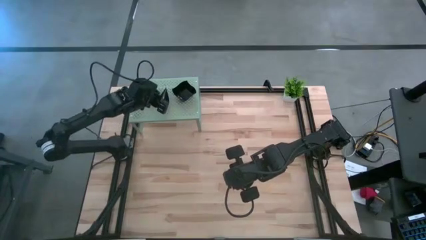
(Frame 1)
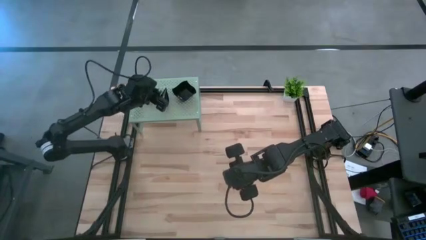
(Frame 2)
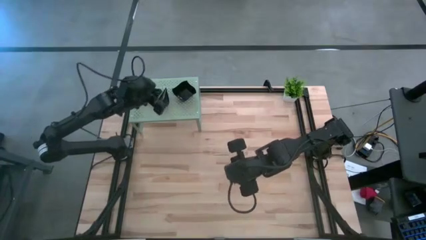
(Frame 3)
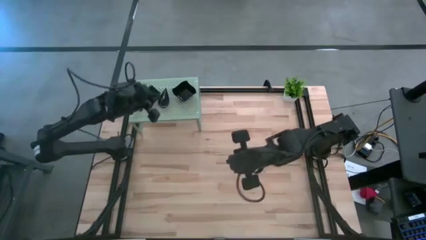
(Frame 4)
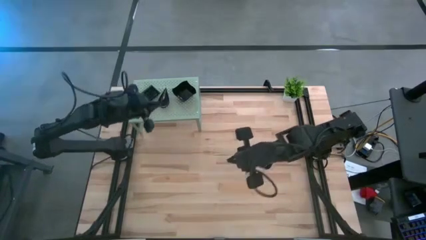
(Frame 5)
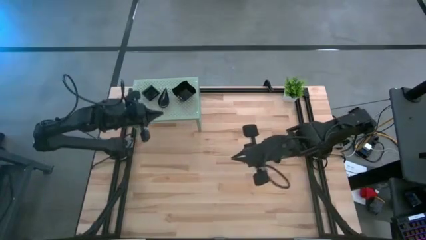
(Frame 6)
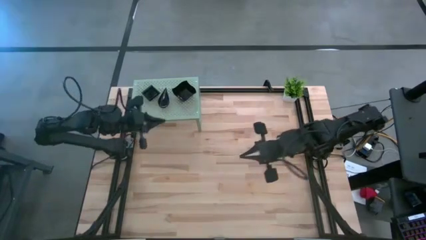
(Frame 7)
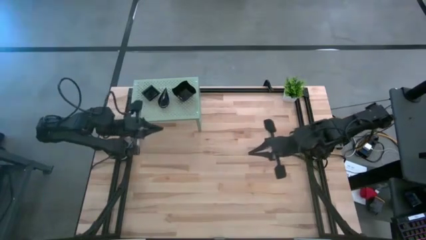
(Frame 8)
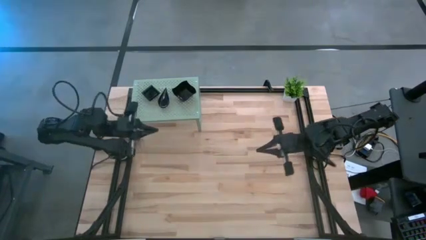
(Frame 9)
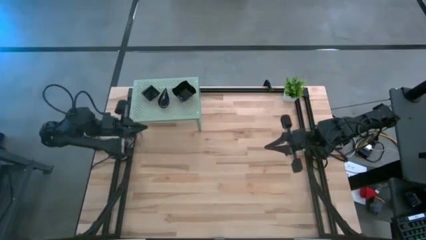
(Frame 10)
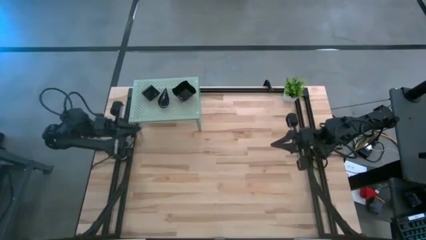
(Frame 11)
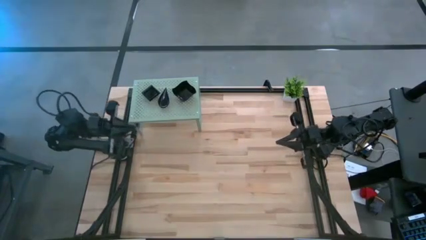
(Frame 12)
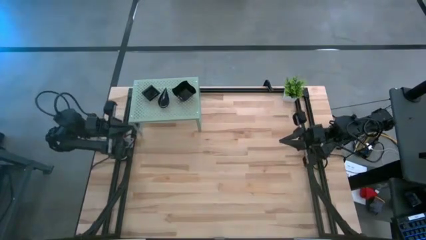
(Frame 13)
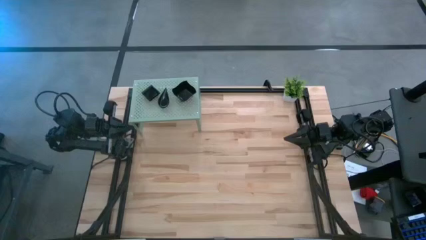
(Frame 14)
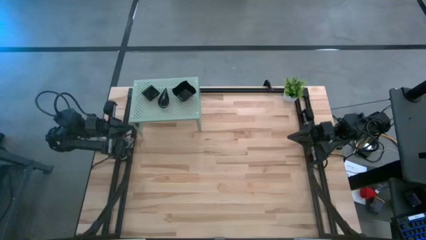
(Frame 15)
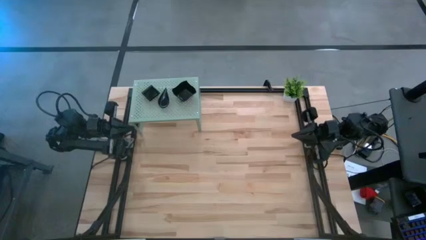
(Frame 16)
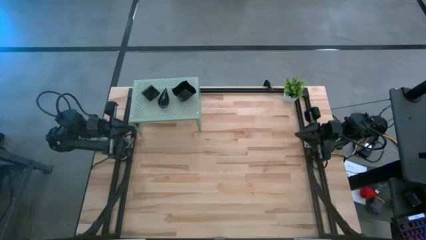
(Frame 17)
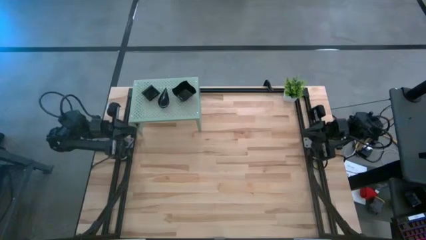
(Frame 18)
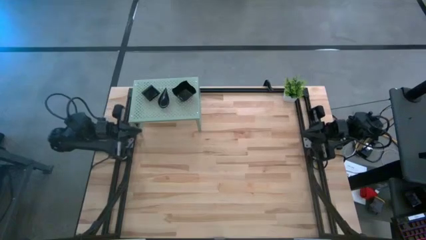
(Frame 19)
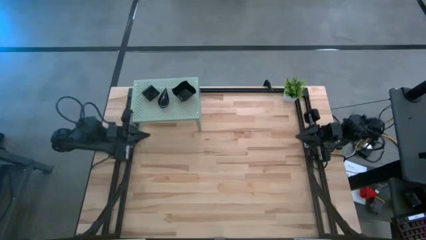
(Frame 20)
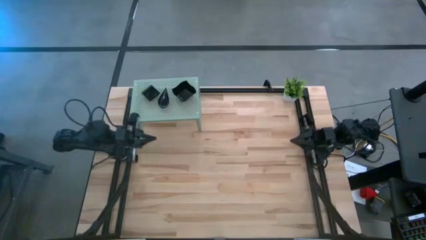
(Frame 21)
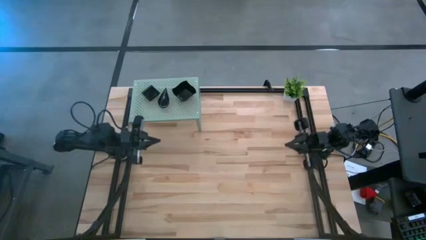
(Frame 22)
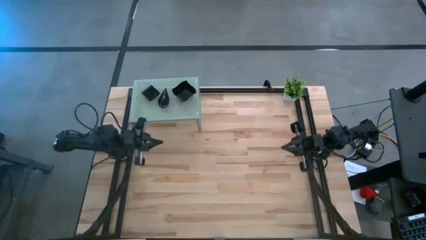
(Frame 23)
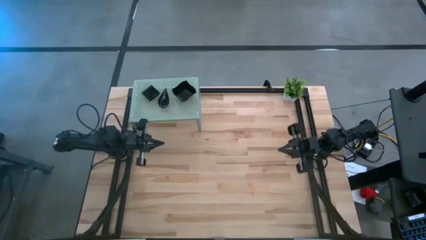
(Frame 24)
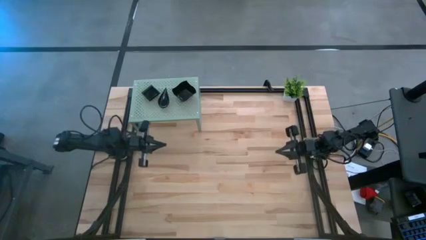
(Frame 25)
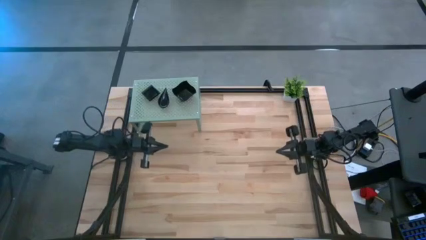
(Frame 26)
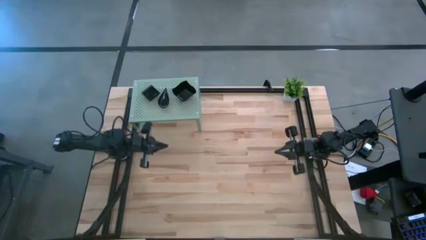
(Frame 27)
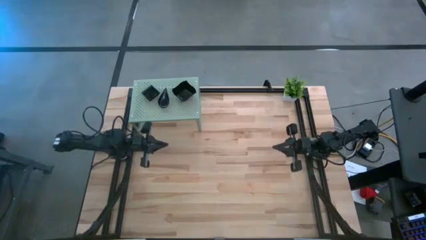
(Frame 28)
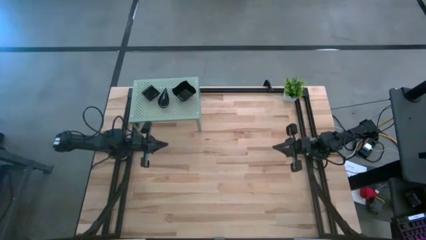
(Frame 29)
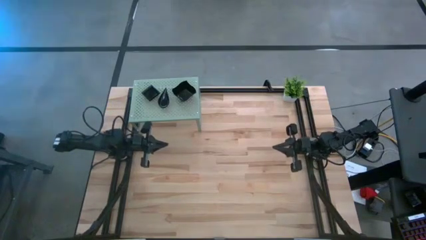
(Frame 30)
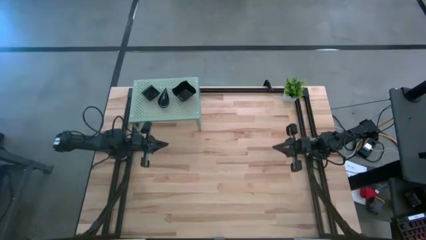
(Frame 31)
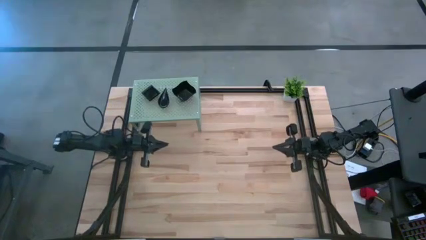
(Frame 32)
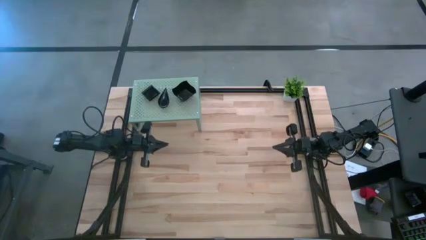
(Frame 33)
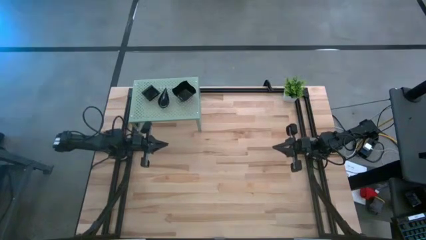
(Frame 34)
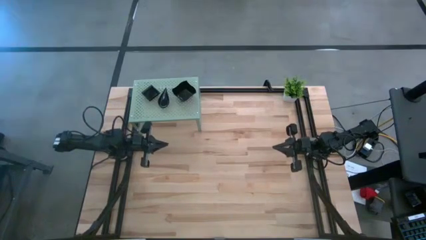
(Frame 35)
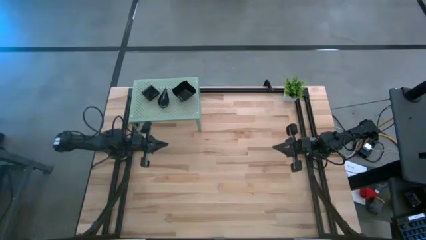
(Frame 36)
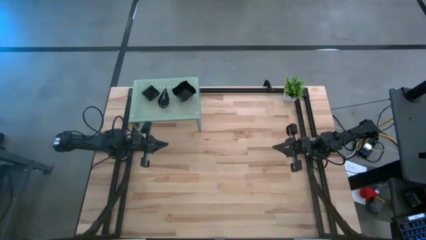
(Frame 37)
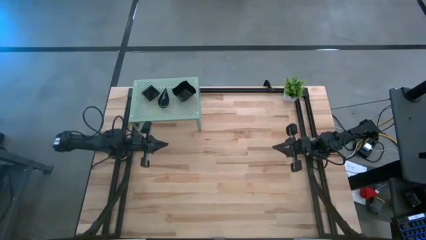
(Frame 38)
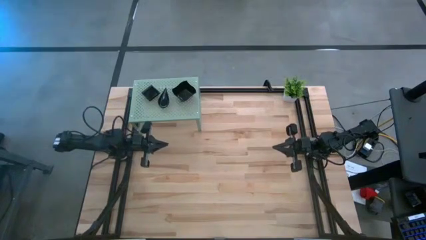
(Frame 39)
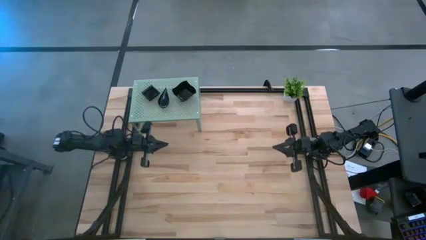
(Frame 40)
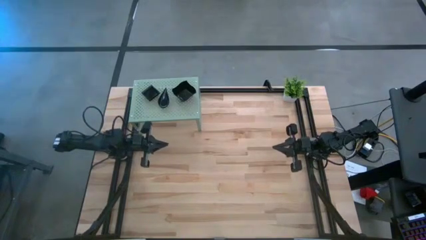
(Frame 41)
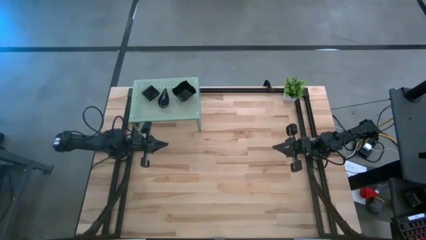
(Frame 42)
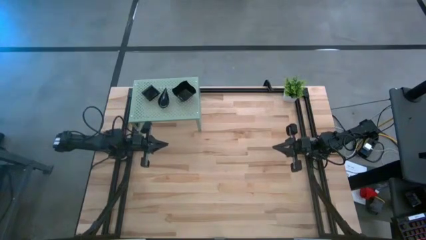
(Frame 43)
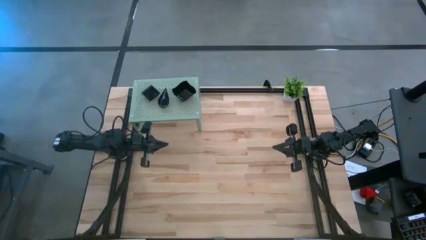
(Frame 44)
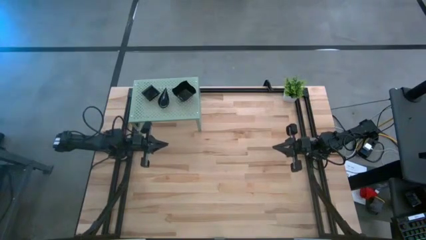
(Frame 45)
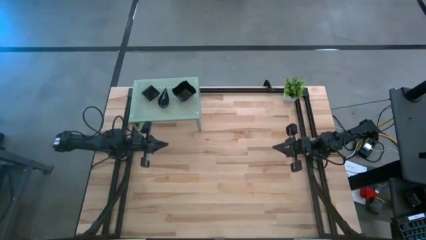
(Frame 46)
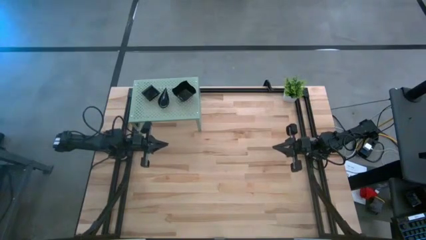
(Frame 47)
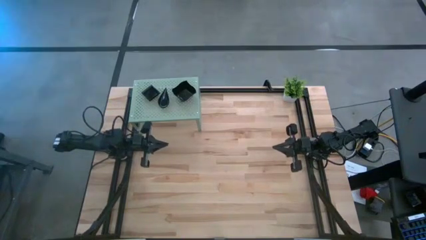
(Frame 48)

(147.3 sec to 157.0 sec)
Task: Pick & Place Mini shaped plates
Return to Home Position
